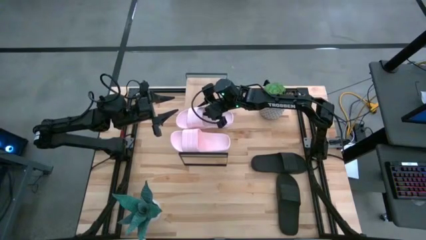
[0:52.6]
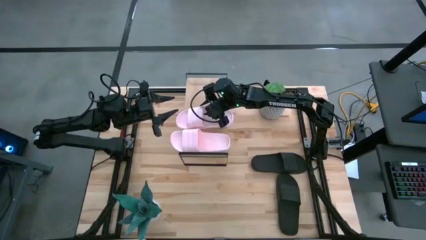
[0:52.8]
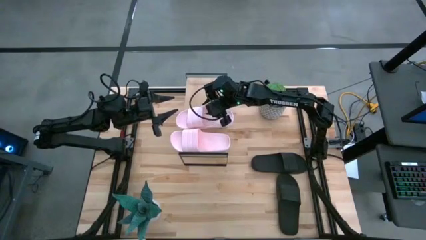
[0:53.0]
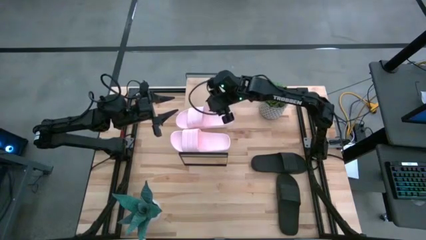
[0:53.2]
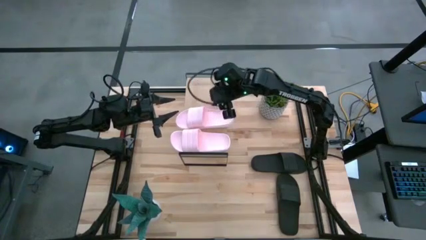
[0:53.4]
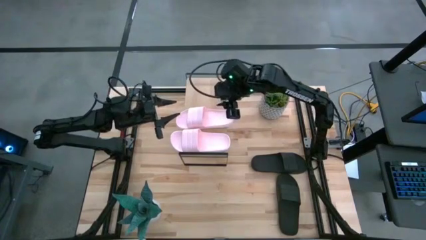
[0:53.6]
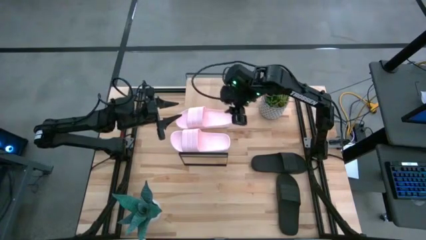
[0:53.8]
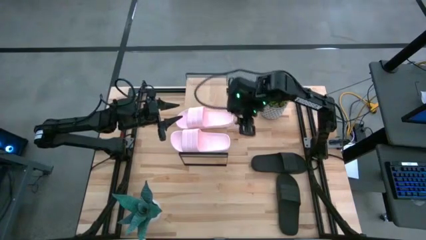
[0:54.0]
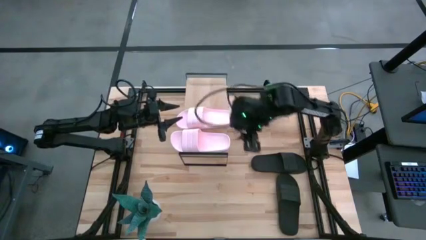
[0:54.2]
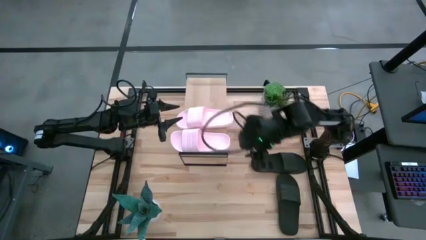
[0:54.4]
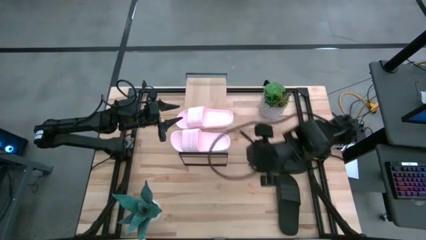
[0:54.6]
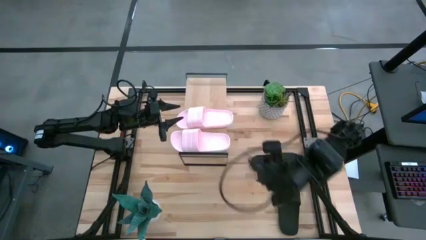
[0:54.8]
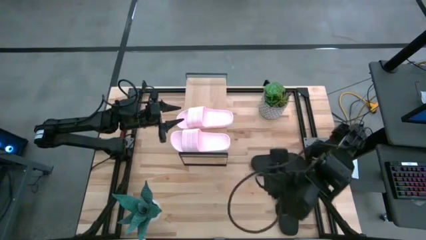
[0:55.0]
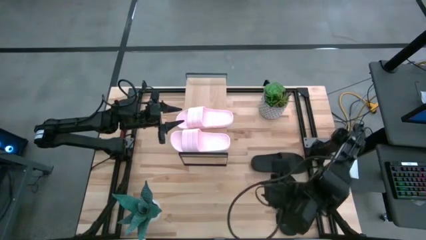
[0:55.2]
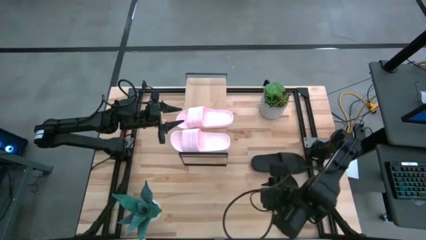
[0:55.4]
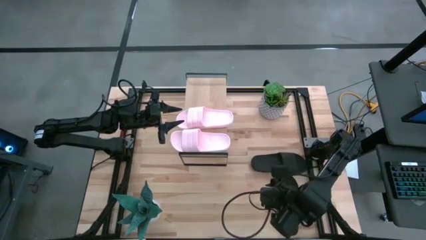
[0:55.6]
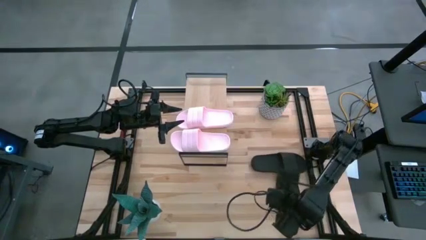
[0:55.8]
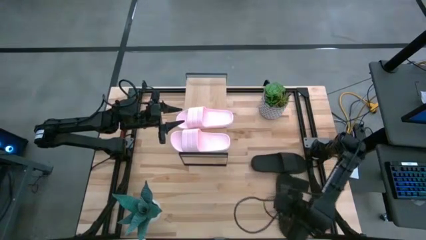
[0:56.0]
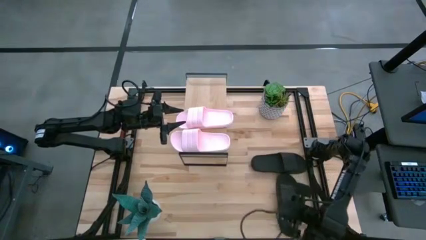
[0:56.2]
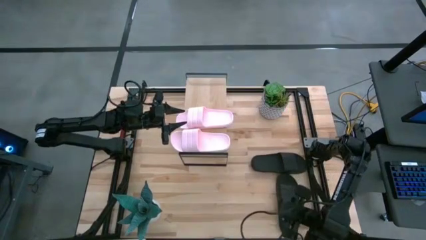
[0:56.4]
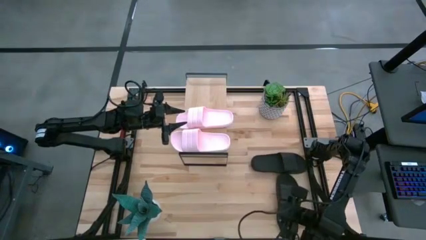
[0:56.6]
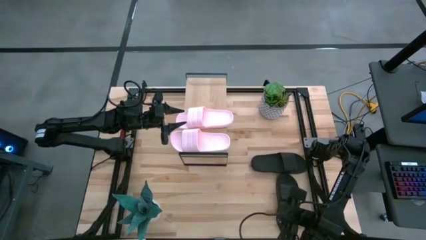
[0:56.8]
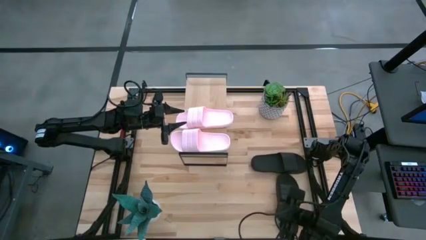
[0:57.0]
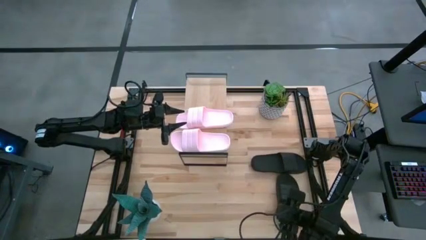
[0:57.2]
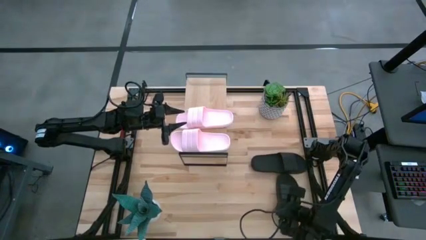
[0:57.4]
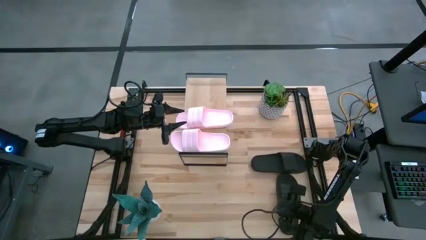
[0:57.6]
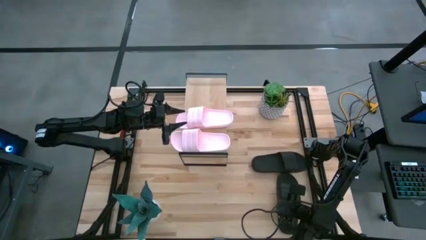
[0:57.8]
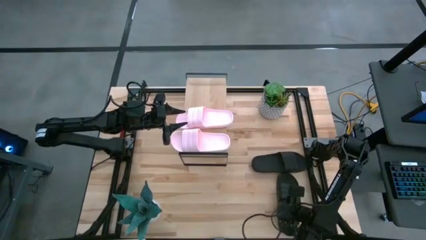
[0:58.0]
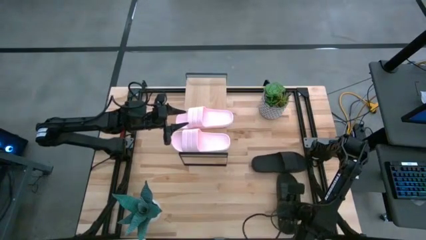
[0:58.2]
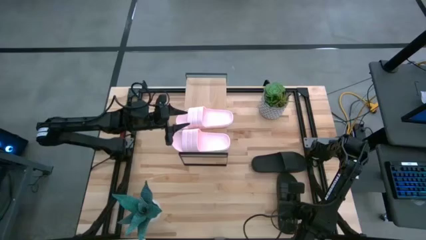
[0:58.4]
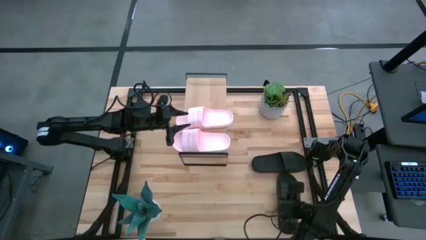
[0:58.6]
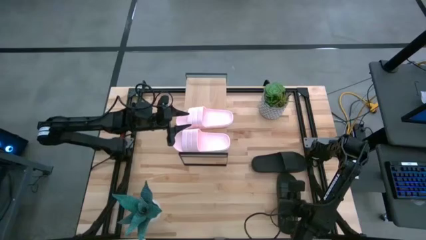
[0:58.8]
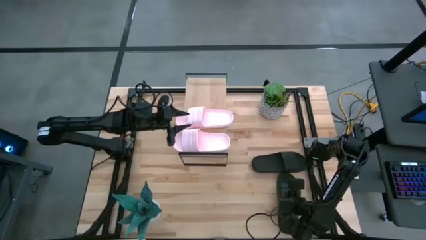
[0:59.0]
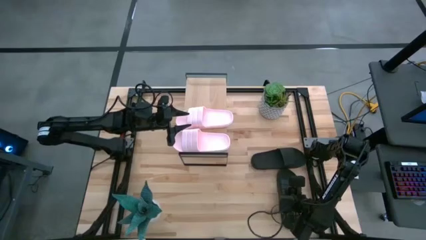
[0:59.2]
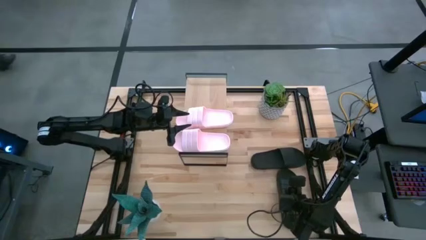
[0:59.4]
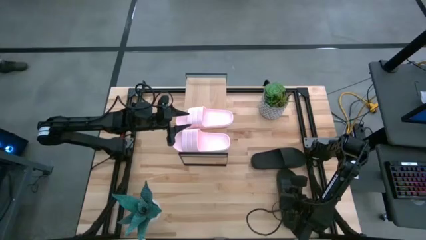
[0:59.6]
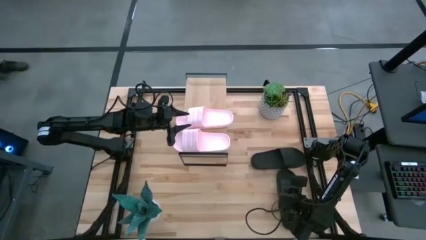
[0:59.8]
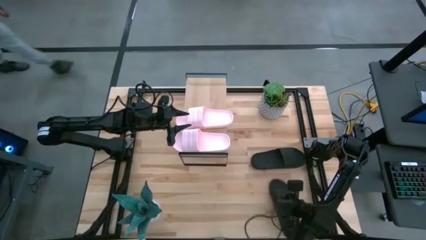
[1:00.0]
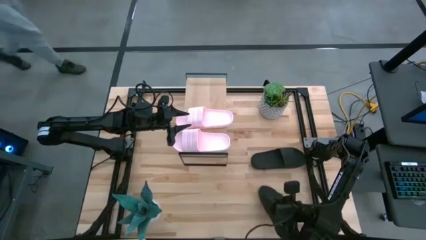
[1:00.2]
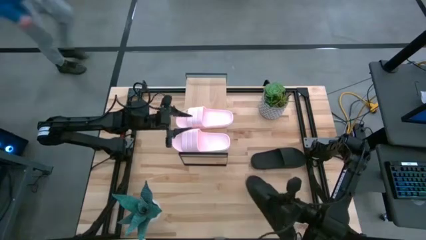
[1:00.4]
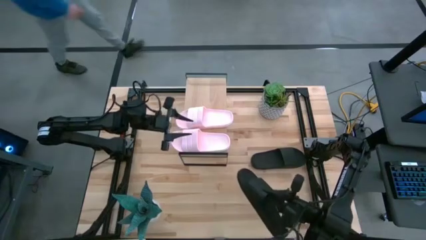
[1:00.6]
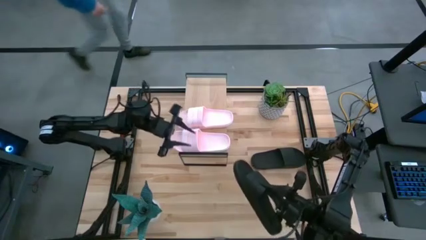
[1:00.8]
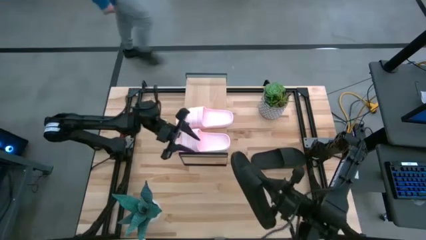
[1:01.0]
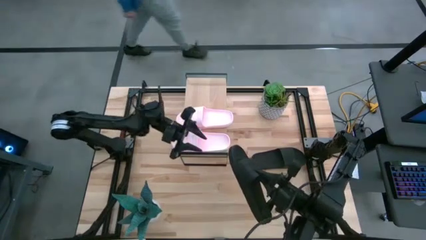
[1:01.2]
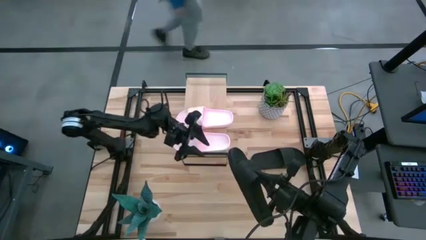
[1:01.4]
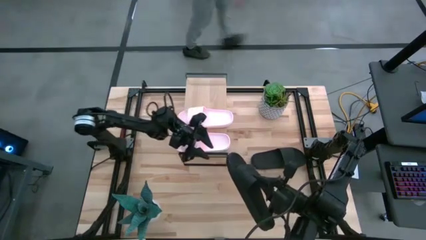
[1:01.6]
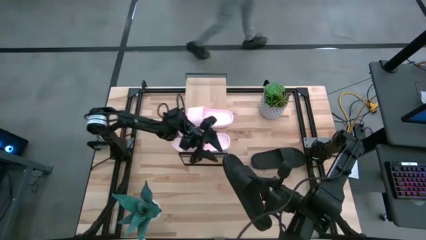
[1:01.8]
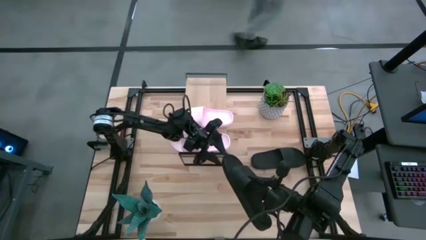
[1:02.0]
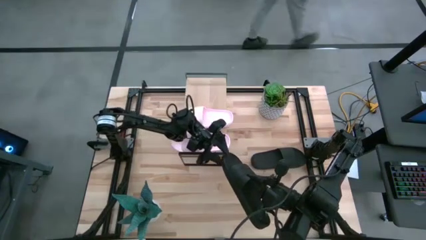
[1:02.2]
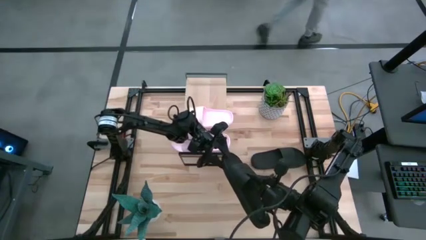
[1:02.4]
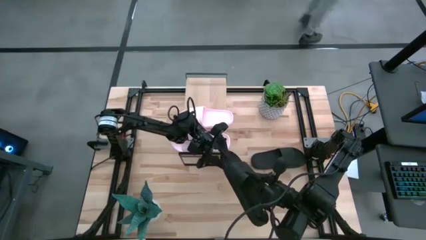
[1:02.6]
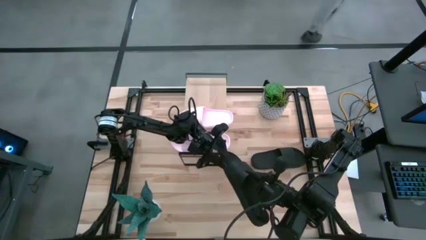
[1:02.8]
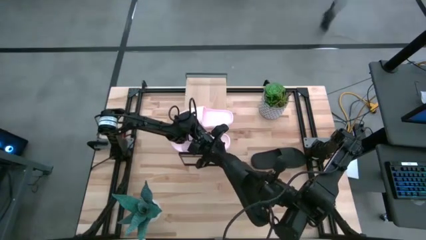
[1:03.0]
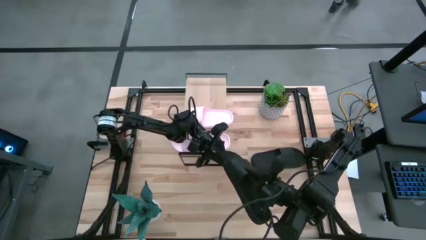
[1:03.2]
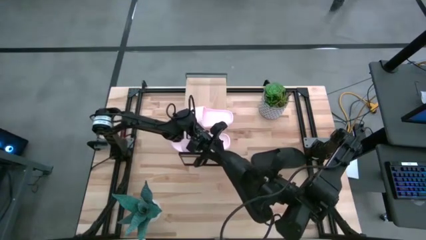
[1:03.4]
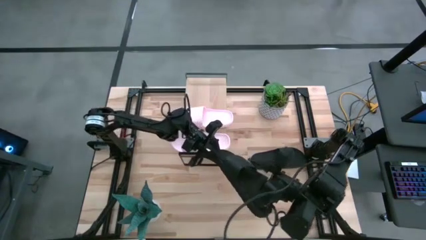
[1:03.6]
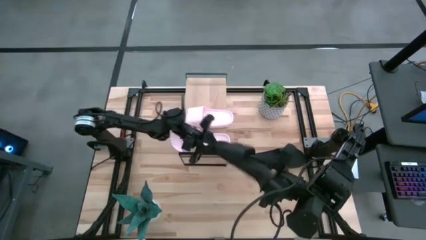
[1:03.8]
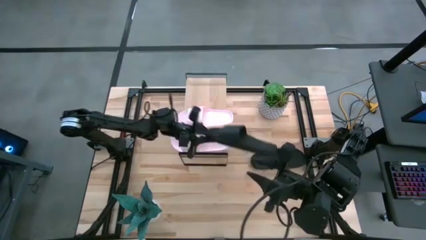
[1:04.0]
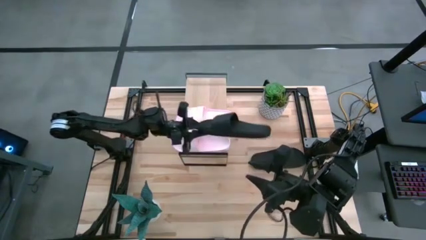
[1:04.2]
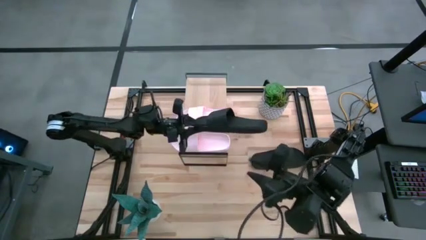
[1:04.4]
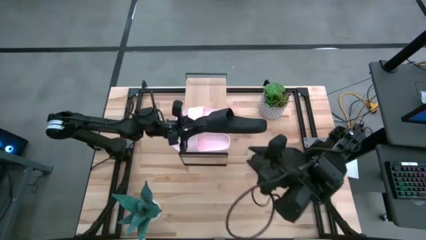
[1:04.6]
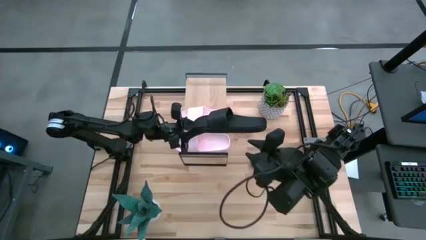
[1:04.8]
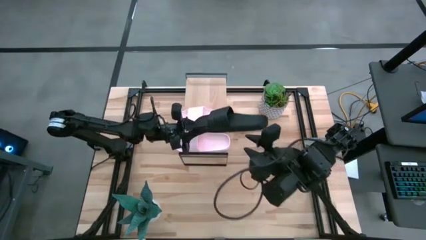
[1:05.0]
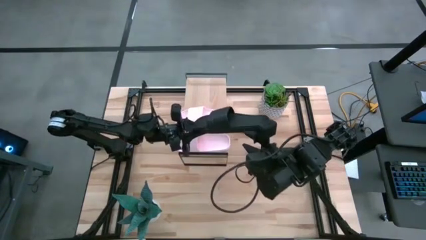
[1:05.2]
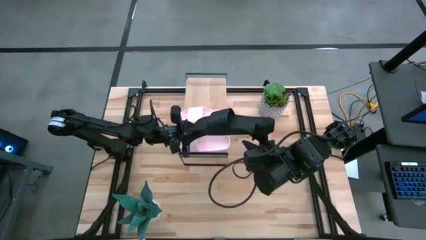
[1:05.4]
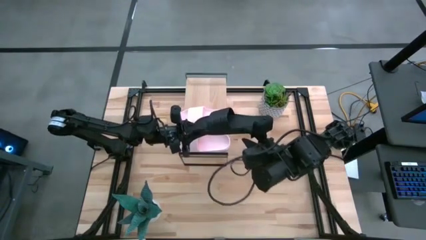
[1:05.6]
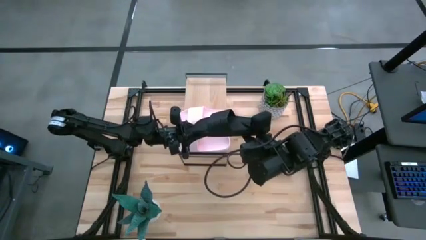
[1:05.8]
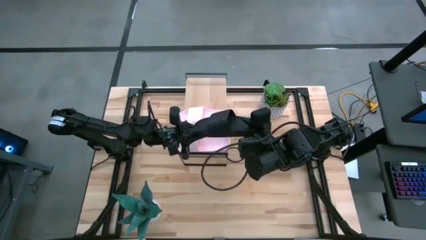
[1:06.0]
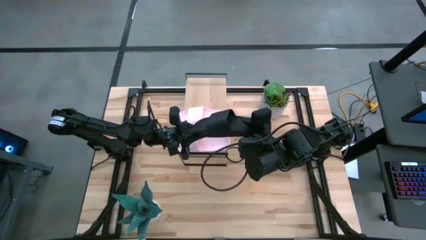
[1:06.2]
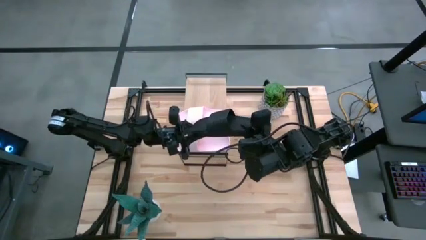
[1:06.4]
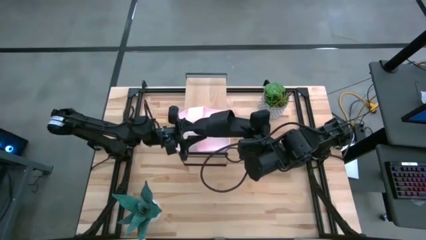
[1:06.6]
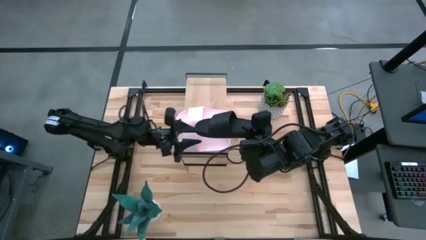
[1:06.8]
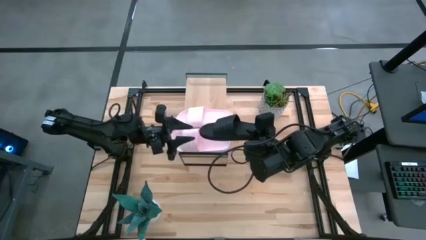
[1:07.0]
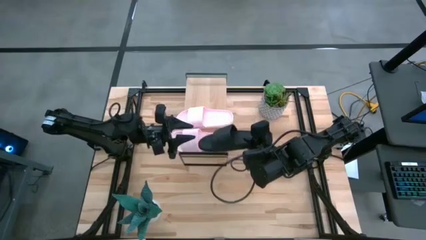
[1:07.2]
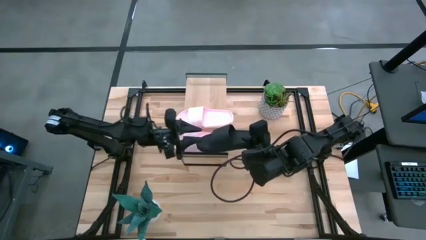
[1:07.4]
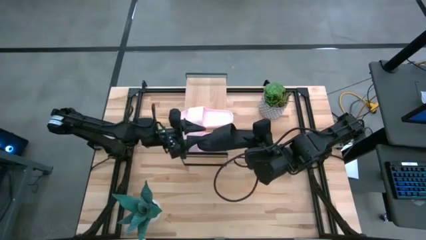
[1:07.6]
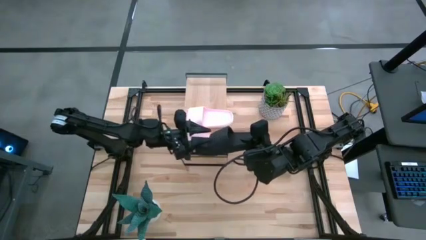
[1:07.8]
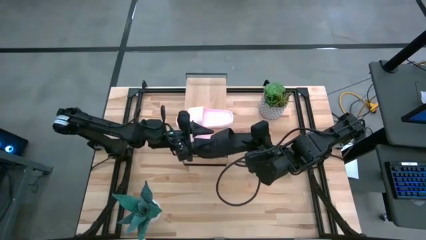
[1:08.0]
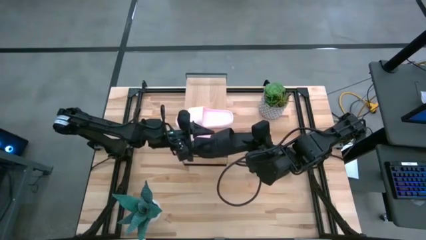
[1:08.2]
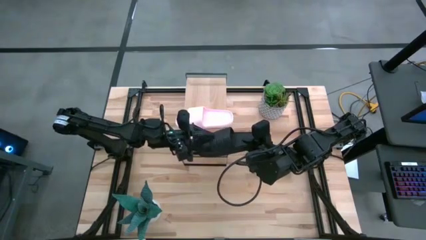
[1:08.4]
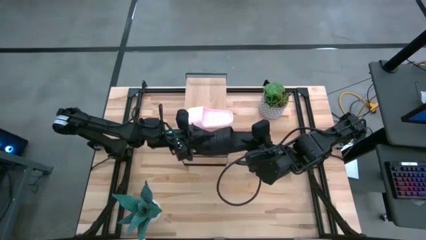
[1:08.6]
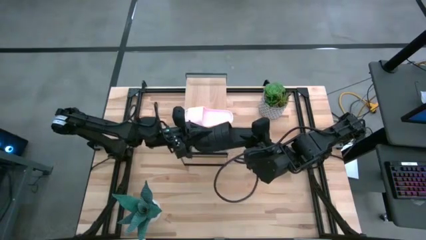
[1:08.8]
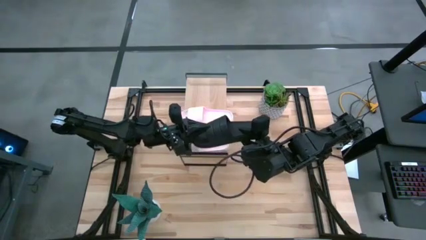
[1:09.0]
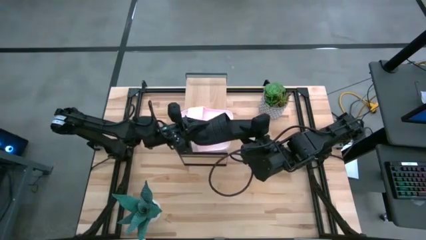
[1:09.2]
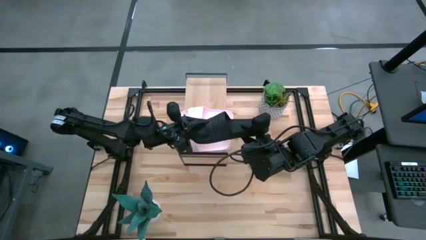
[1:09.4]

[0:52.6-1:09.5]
Task: Pick and place slides into the shelf
Put the bottom black slipper on the shelf
